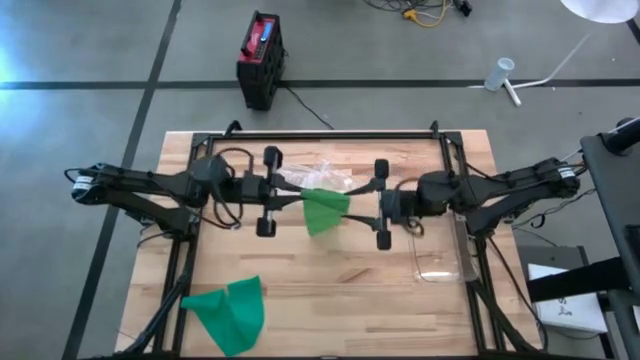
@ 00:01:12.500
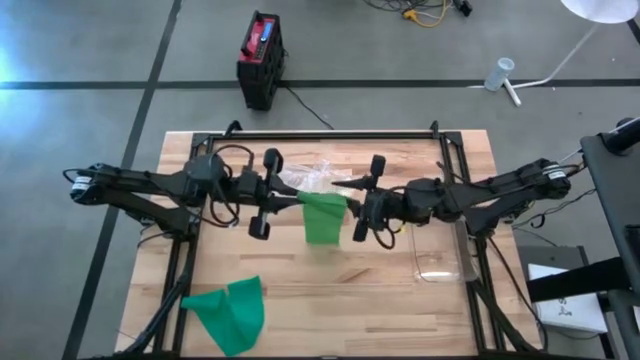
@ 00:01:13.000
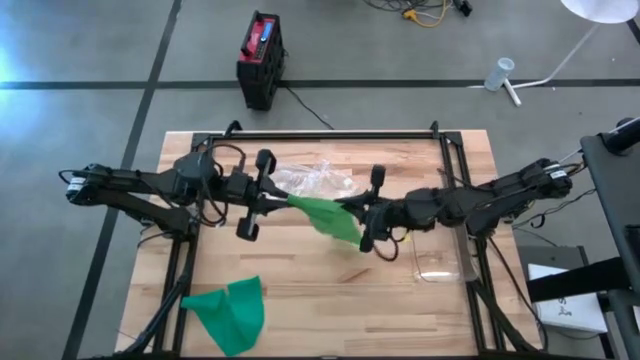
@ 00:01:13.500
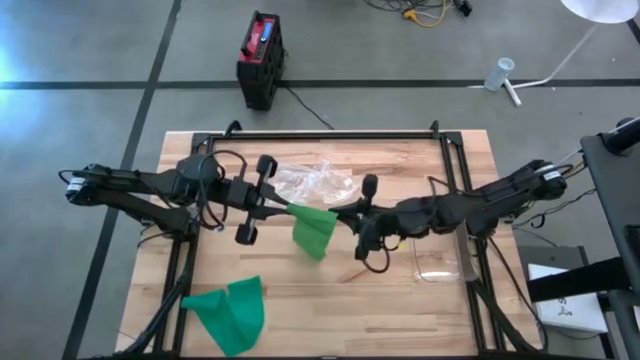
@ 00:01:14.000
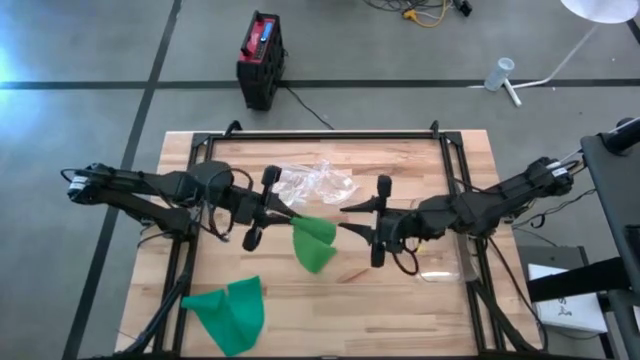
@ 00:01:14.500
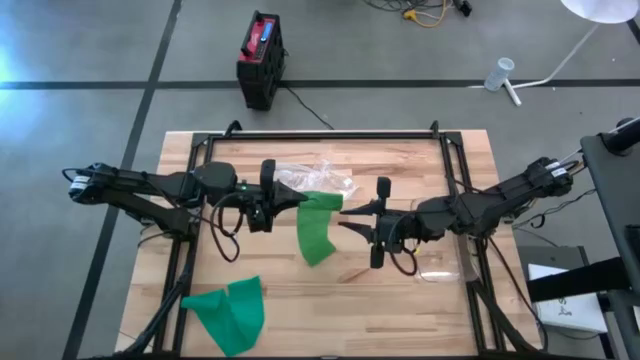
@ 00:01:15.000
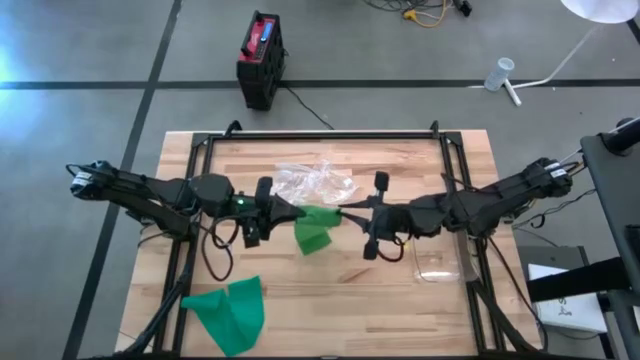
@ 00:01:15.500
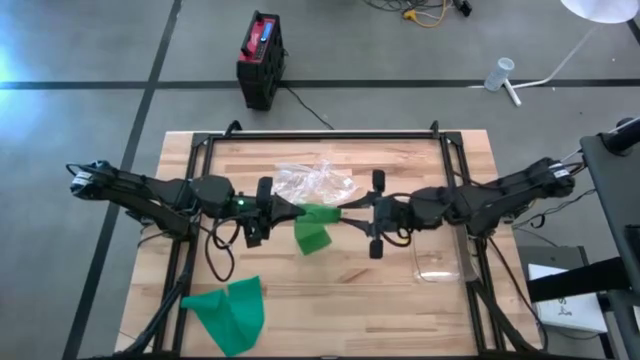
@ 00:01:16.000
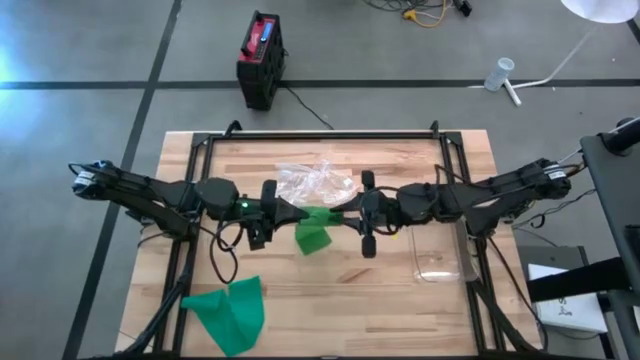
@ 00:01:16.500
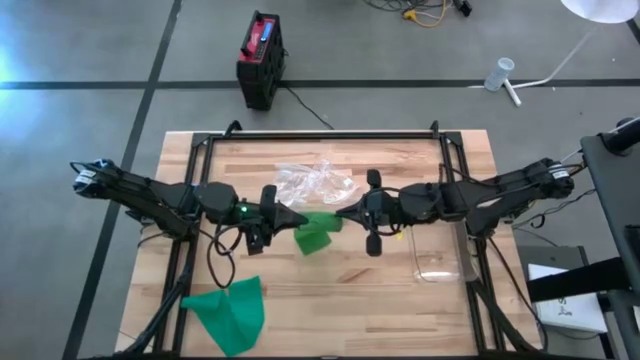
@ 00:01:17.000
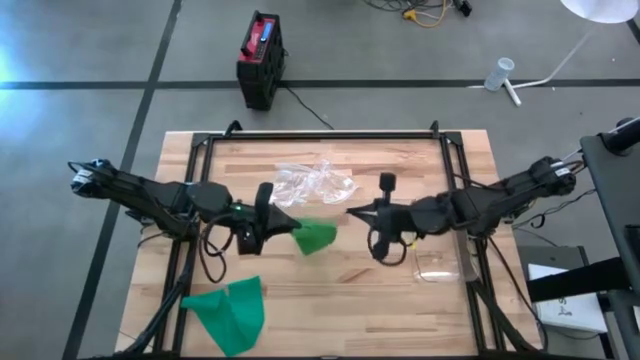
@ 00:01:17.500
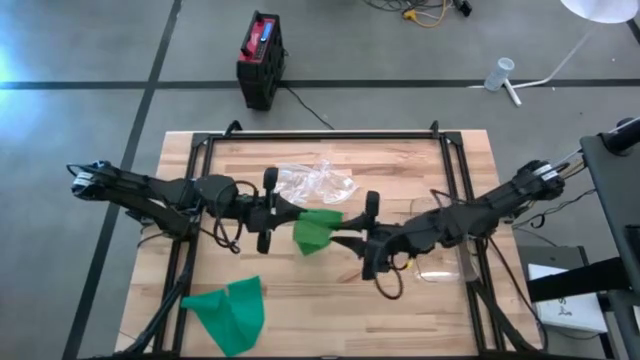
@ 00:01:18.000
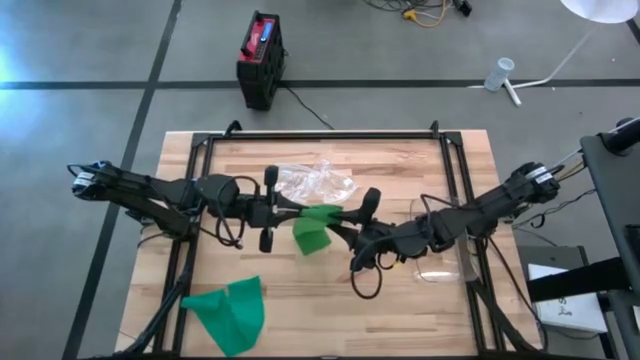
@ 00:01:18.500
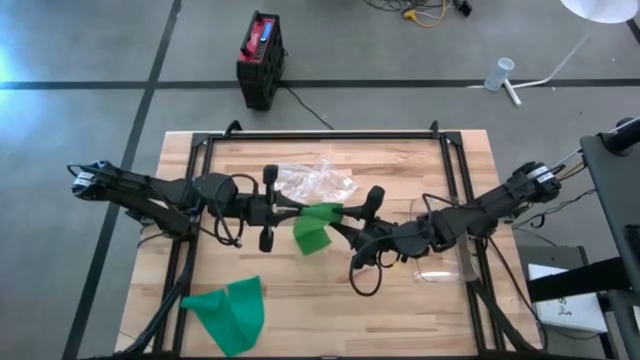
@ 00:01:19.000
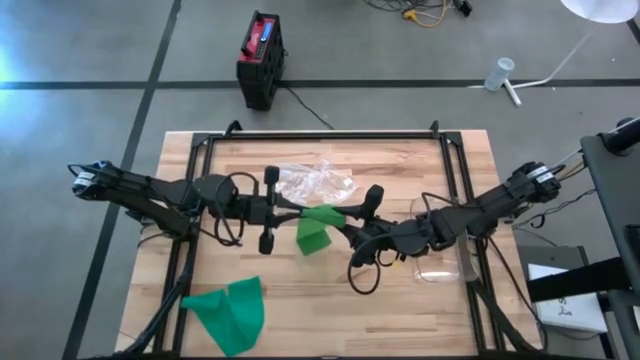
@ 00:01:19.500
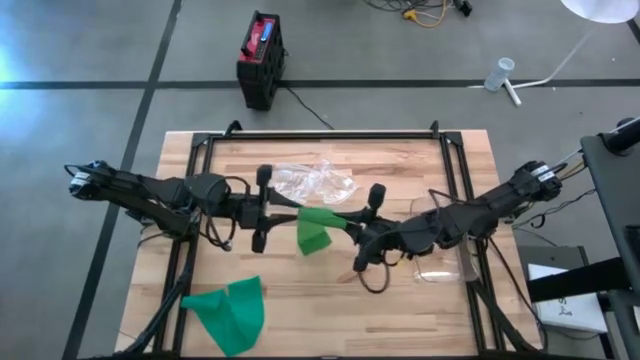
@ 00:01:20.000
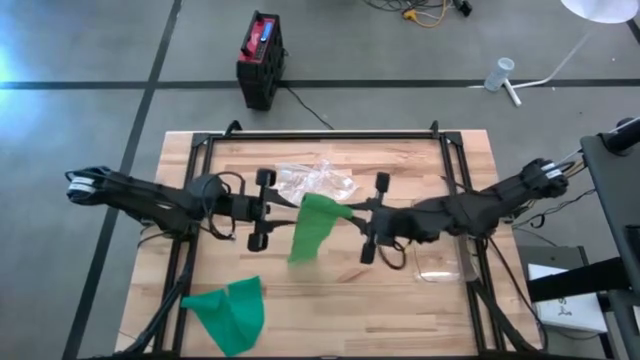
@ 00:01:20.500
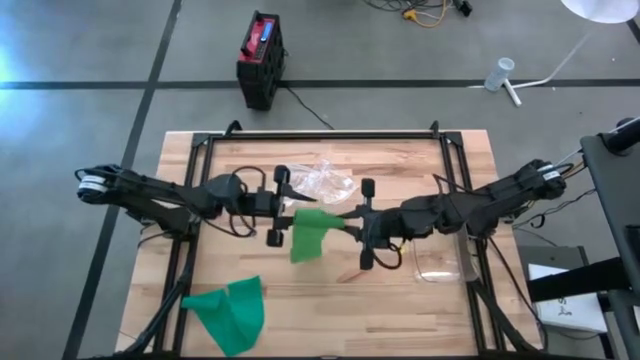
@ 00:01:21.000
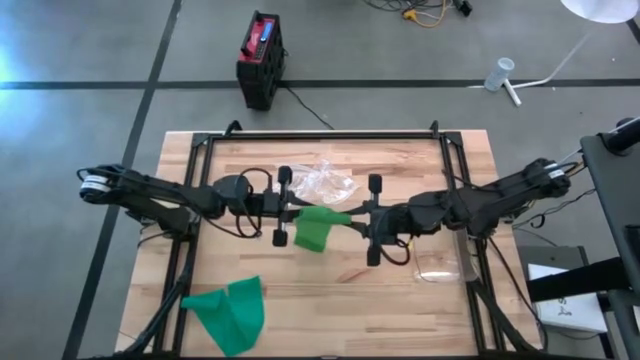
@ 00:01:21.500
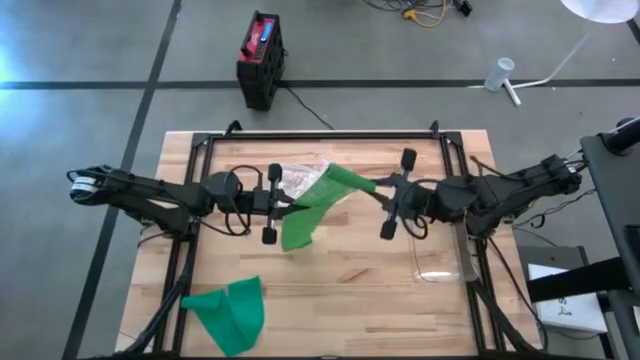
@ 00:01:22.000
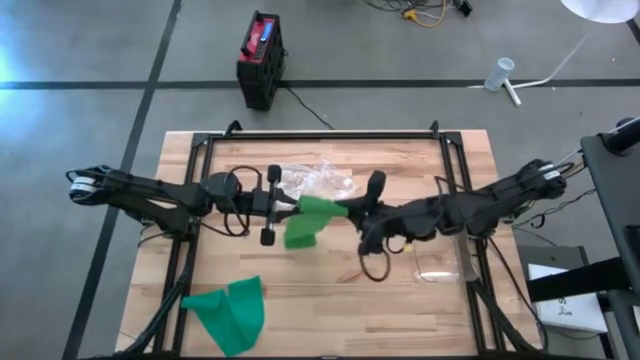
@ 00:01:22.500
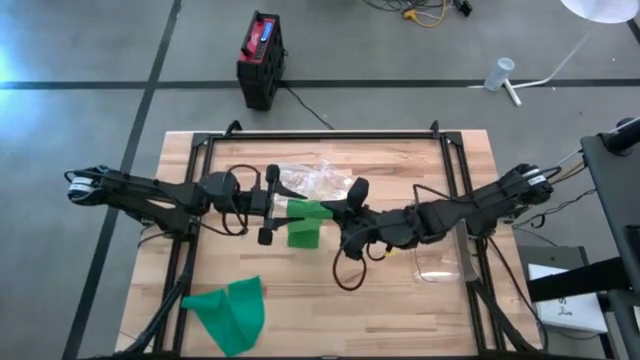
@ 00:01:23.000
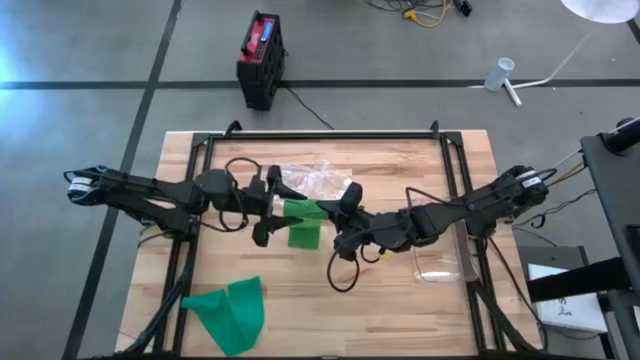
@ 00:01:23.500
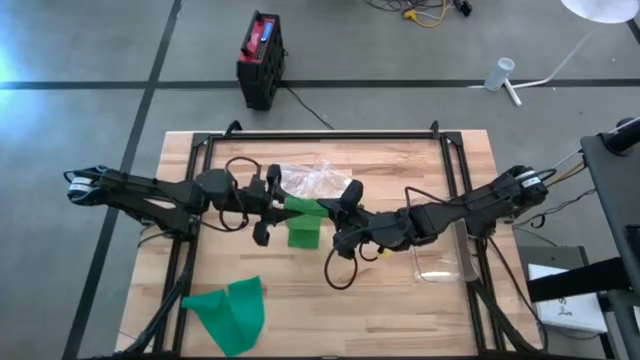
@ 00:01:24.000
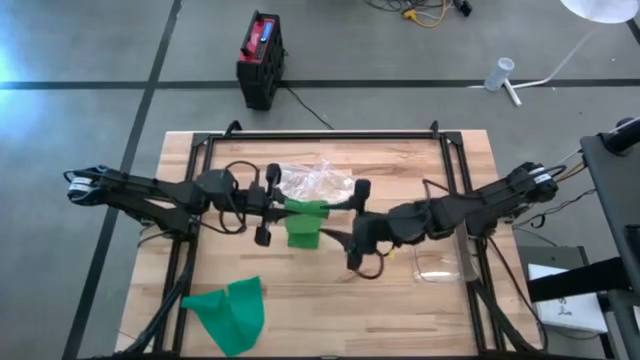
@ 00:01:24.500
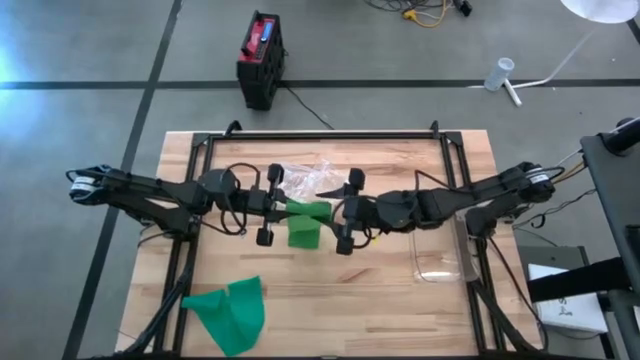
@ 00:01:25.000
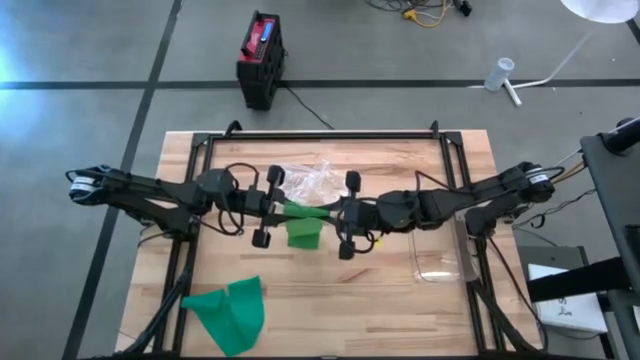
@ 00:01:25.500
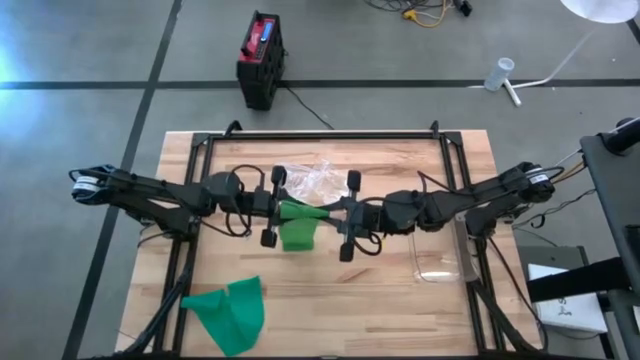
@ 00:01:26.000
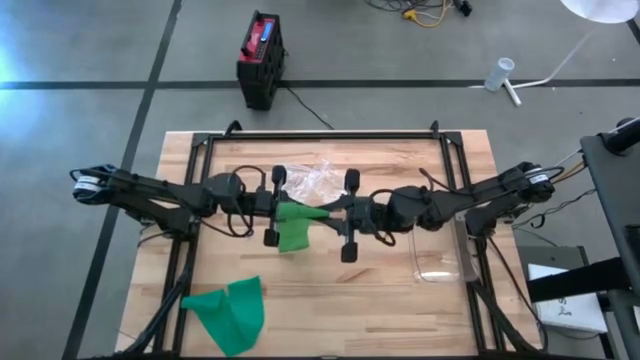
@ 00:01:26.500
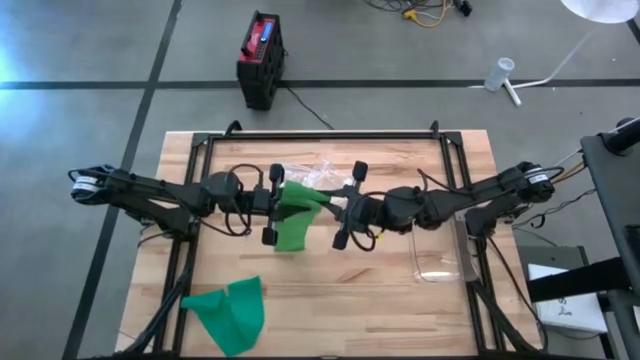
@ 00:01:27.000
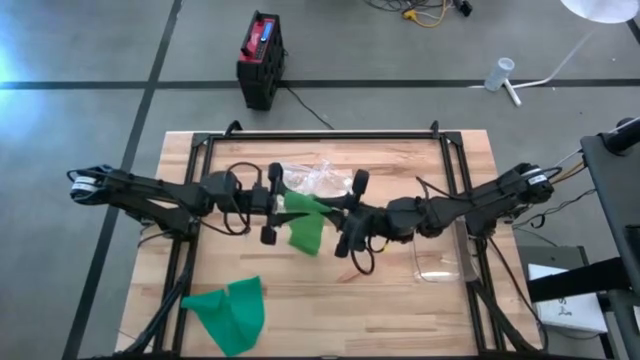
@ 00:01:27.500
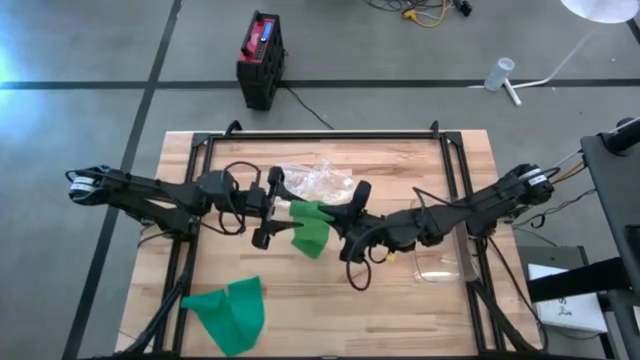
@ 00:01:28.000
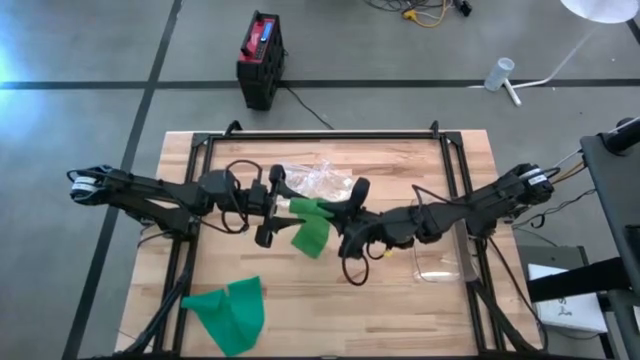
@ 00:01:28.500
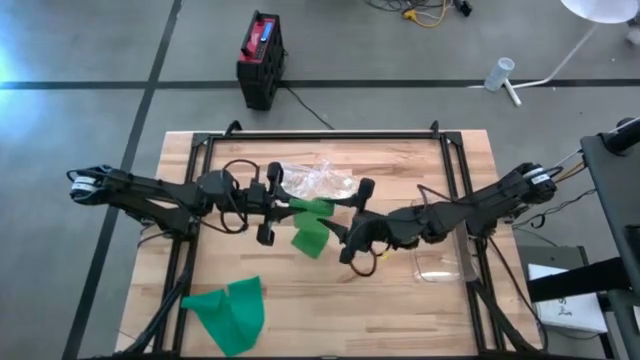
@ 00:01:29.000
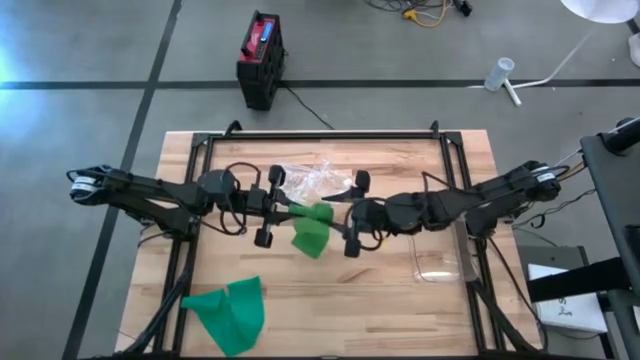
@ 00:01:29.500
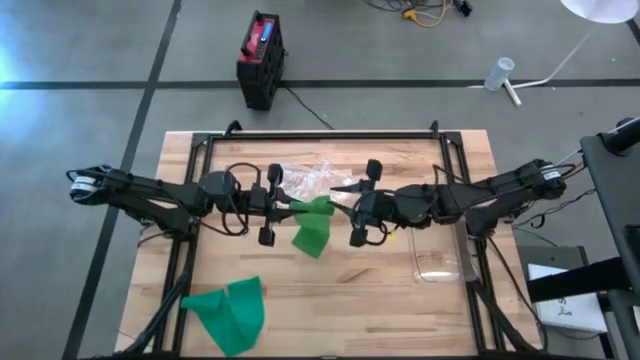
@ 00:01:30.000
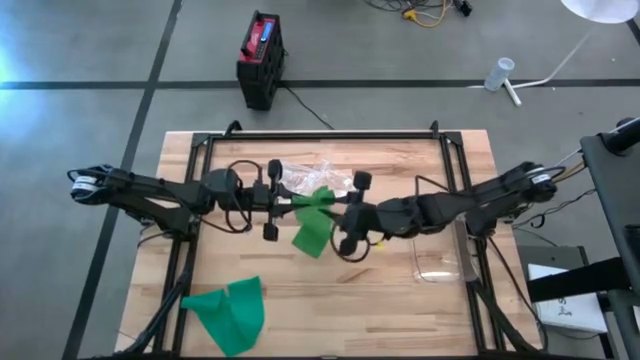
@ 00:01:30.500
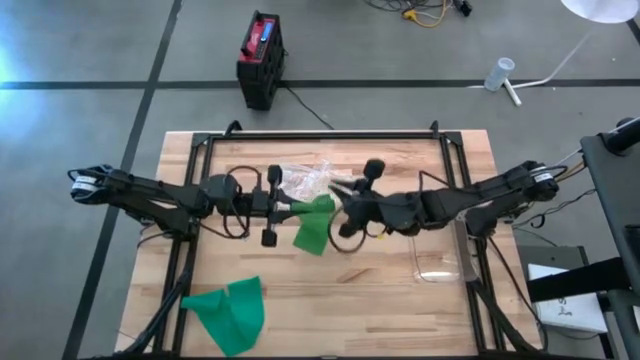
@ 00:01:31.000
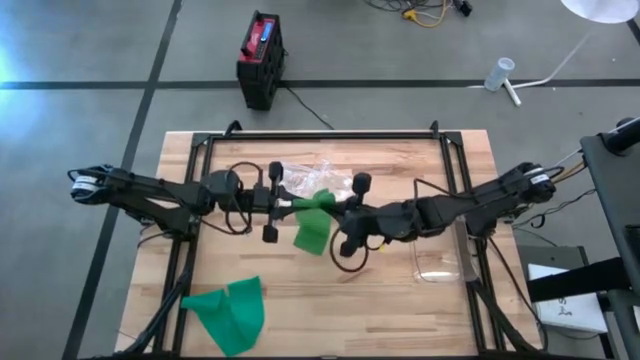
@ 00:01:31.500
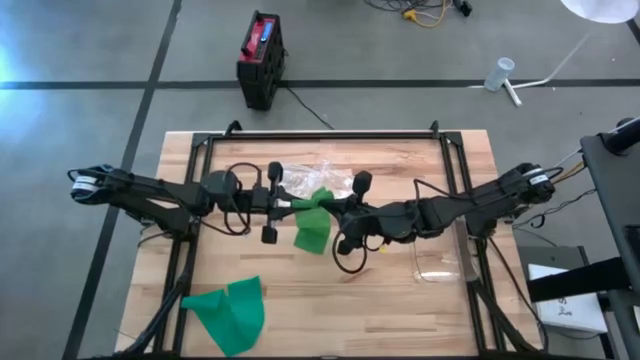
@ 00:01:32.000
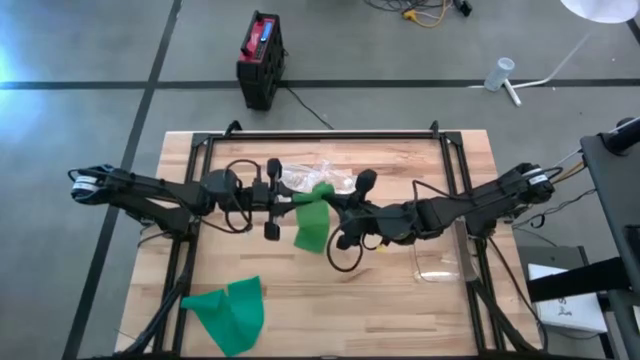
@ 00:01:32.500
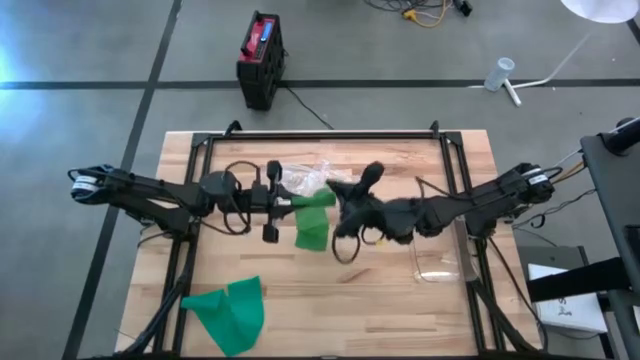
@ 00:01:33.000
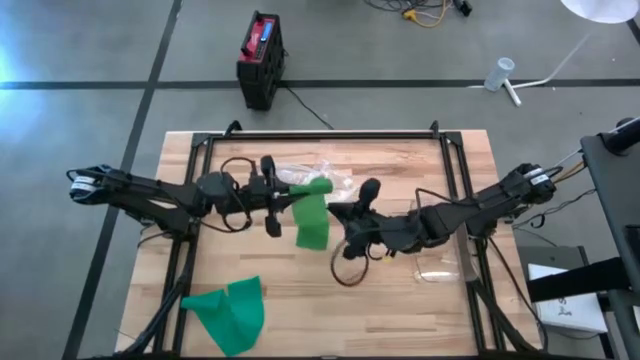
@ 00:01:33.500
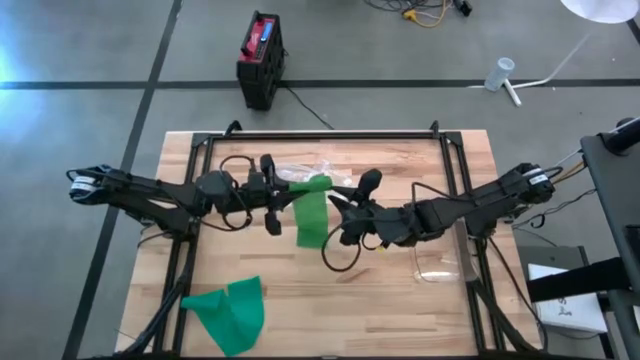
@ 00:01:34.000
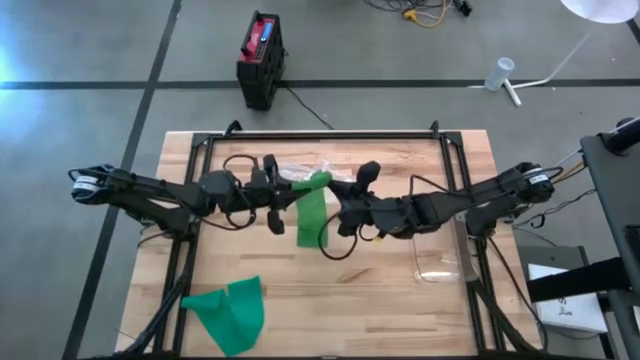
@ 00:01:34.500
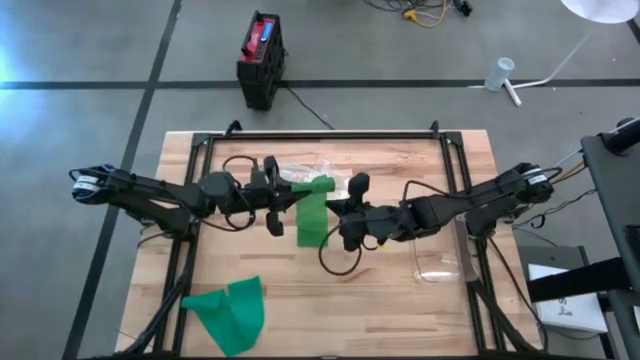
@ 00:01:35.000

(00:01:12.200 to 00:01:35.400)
Task: Roll bandage
Roll the green bandage
